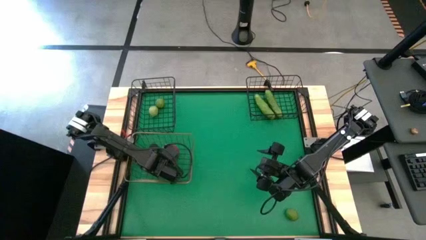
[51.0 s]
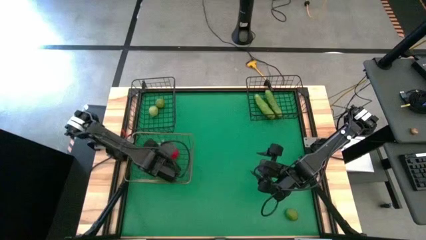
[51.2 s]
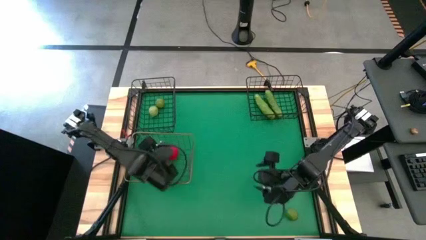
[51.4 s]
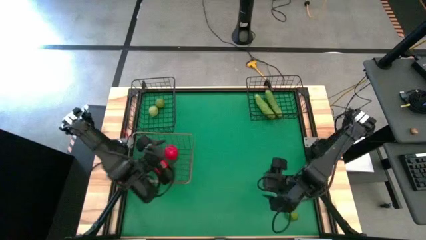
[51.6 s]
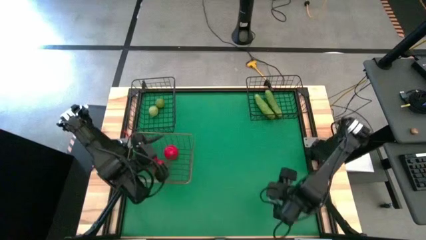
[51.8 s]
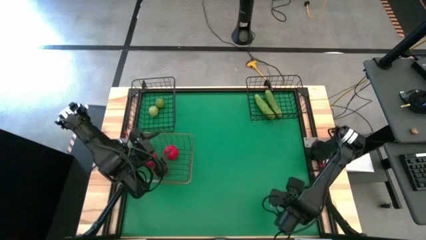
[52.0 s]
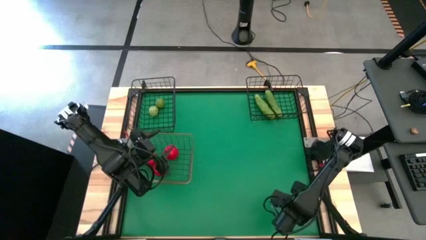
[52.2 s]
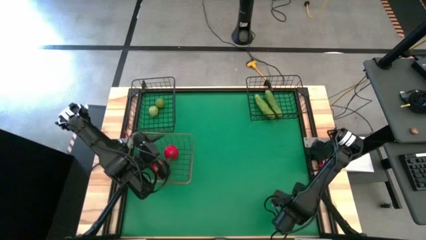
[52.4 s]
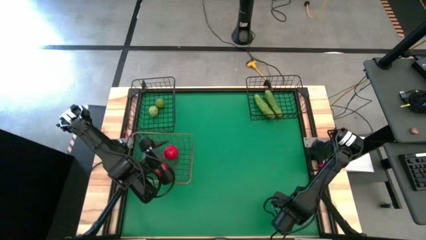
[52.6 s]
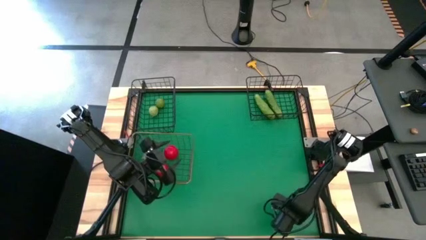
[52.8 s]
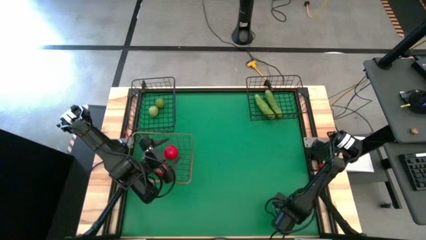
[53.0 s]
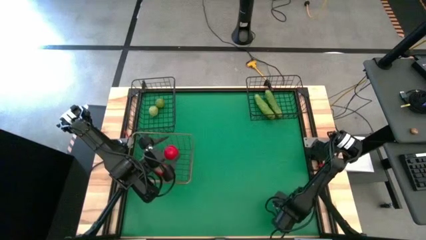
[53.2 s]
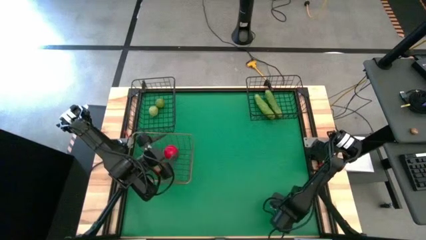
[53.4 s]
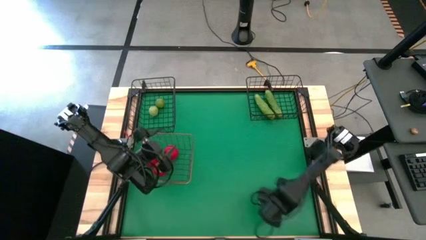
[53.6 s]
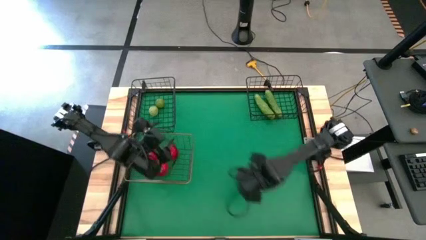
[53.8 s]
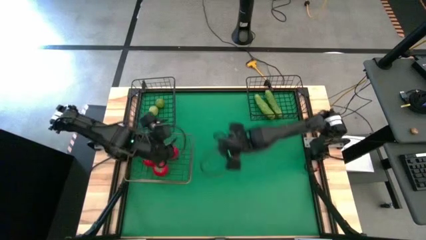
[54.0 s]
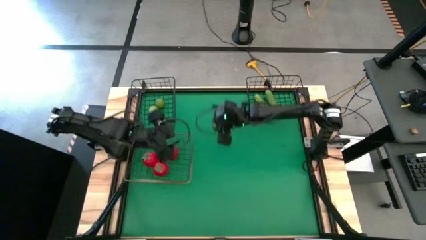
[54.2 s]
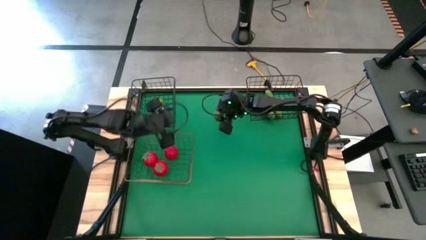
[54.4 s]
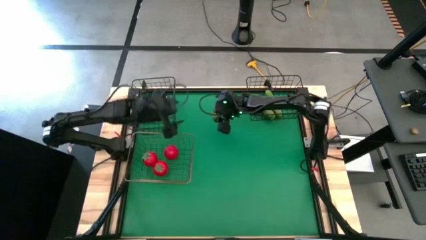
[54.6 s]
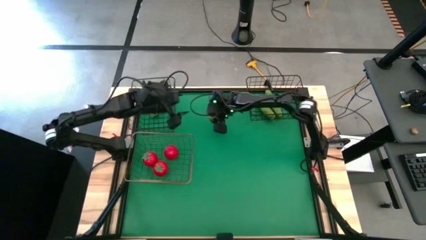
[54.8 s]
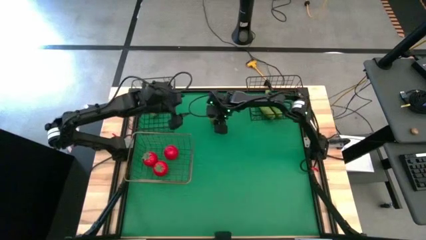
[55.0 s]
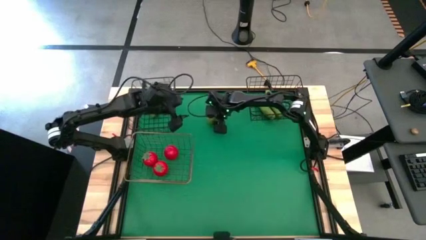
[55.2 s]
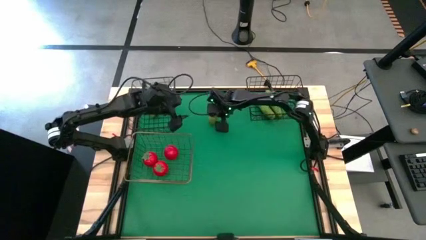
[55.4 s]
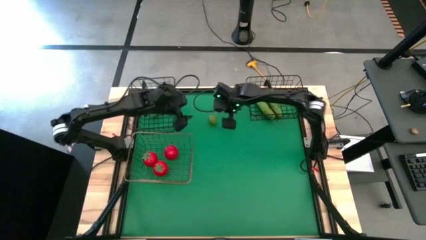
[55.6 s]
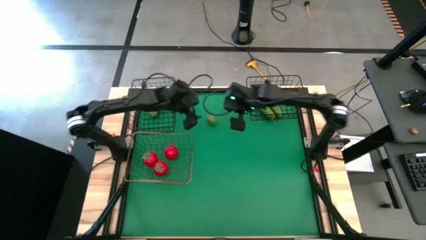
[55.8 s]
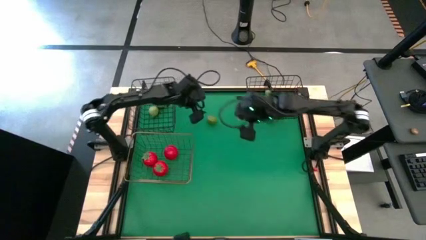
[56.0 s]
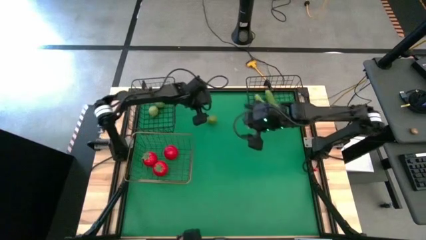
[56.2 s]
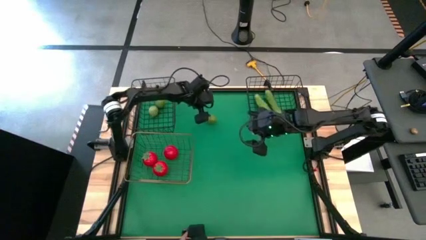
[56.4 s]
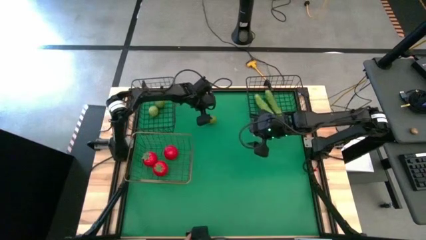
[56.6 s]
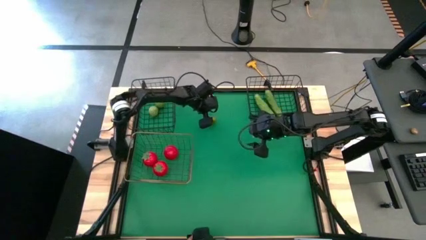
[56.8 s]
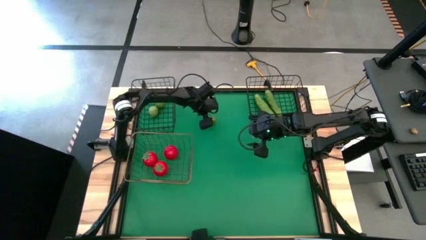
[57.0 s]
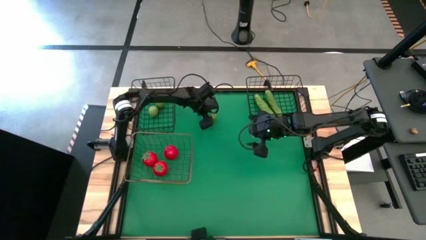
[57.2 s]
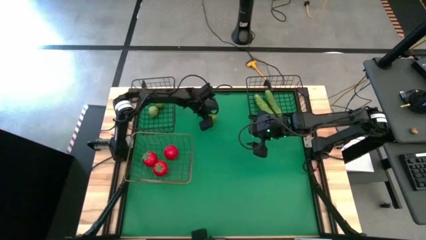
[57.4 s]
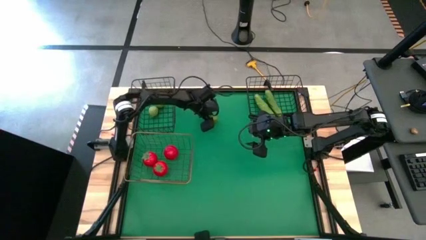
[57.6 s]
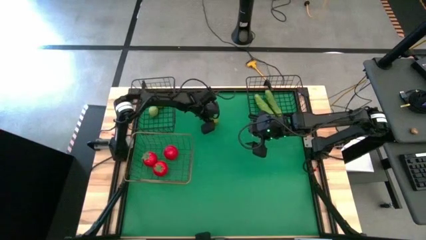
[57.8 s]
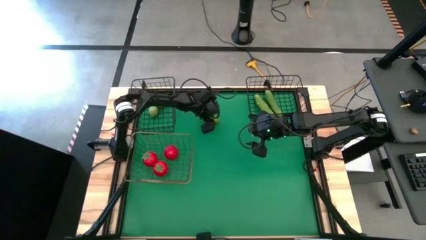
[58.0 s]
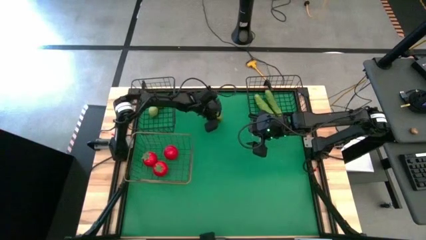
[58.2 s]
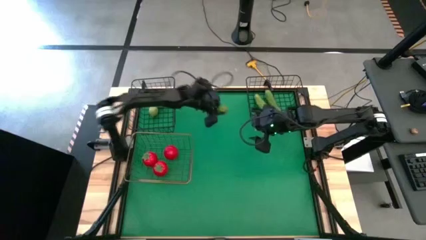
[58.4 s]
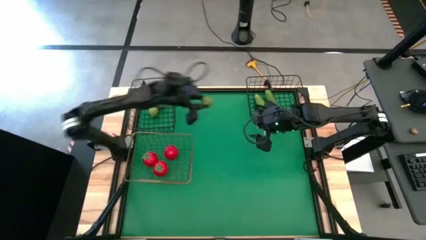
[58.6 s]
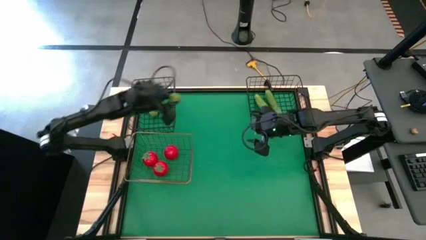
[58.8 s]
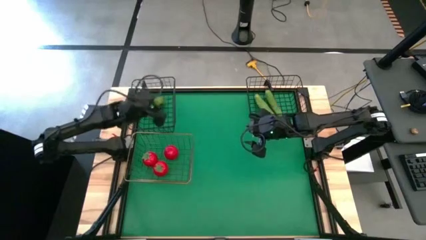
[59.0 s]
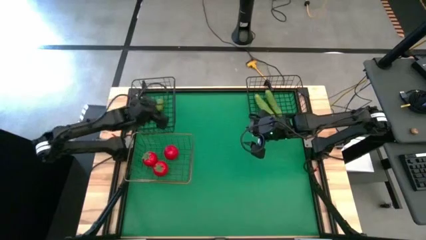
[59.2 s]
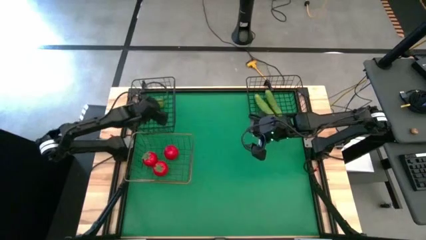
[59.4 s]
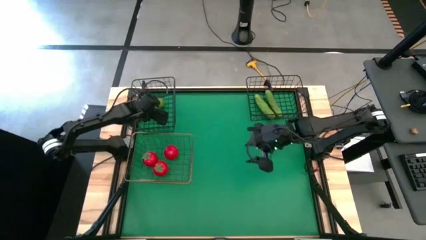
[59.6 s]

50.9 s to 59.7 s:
Task: Sort produce into baskets
Put the lime into the left black wire basket

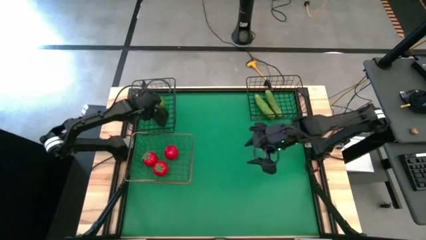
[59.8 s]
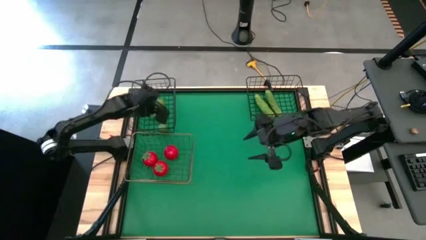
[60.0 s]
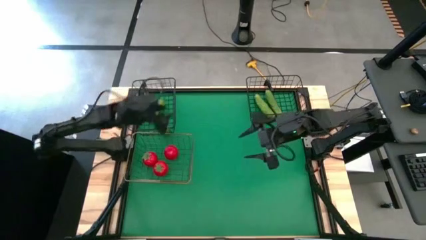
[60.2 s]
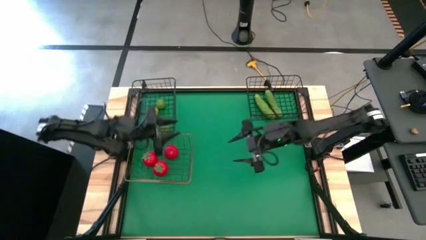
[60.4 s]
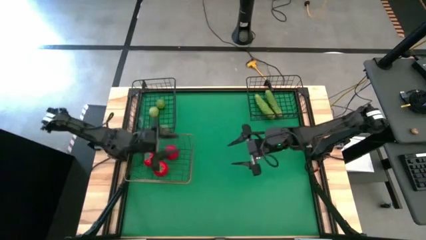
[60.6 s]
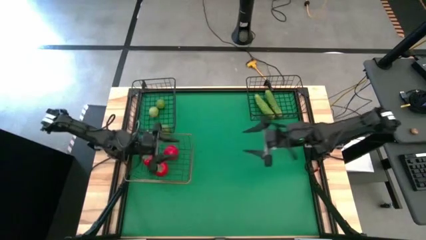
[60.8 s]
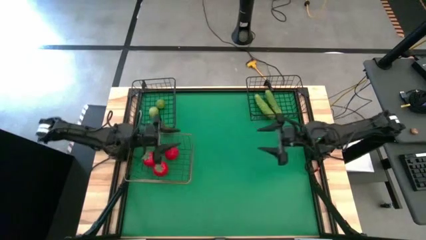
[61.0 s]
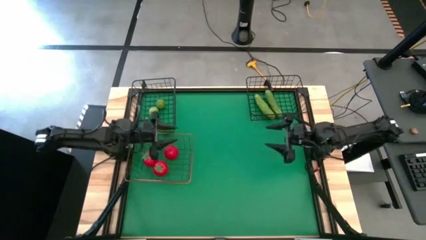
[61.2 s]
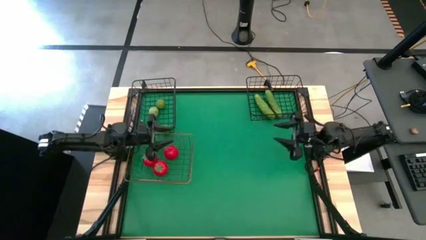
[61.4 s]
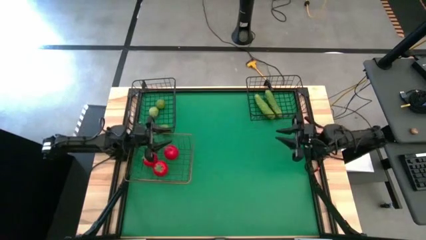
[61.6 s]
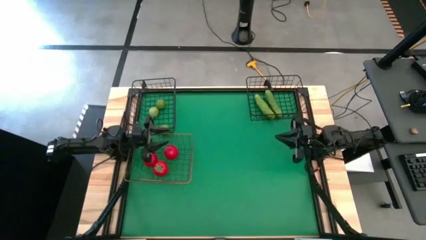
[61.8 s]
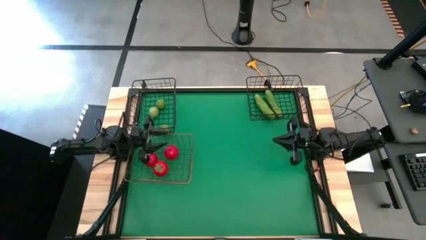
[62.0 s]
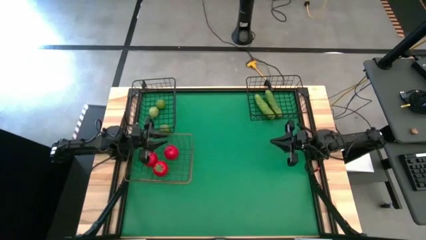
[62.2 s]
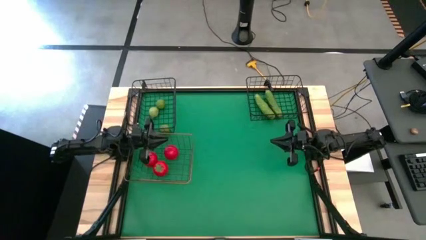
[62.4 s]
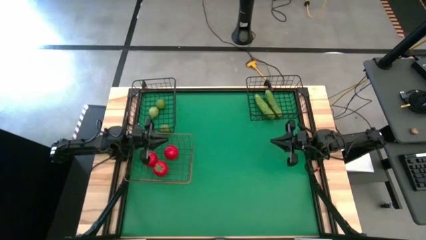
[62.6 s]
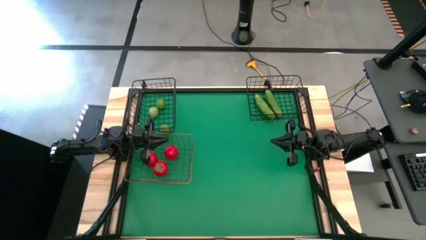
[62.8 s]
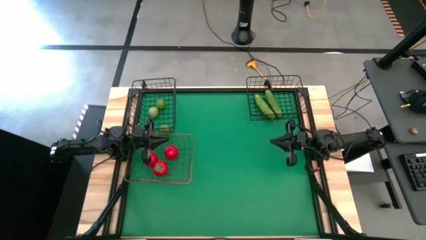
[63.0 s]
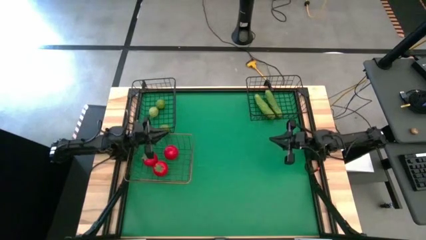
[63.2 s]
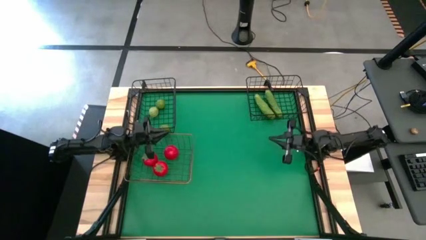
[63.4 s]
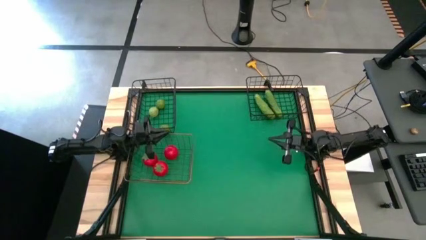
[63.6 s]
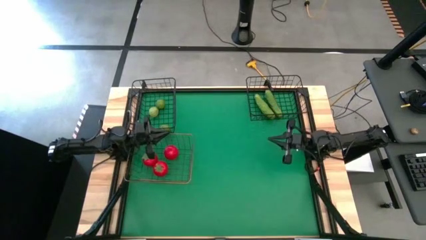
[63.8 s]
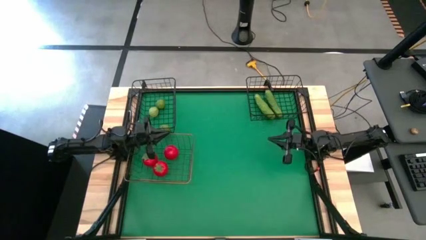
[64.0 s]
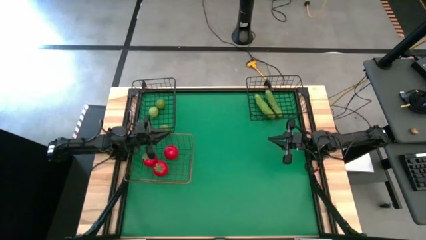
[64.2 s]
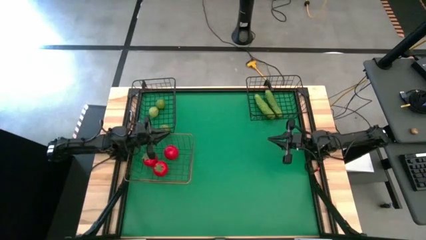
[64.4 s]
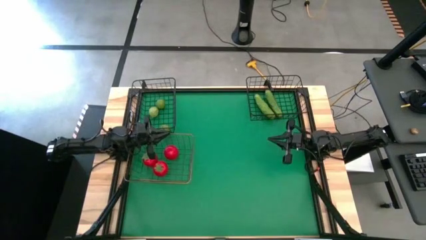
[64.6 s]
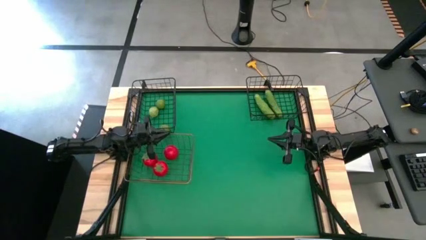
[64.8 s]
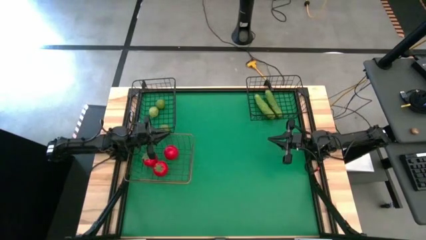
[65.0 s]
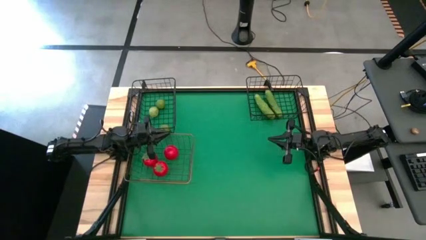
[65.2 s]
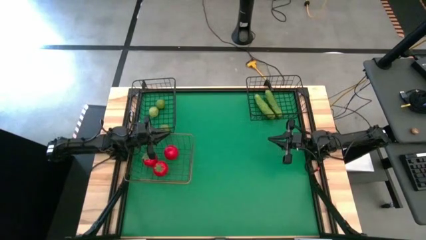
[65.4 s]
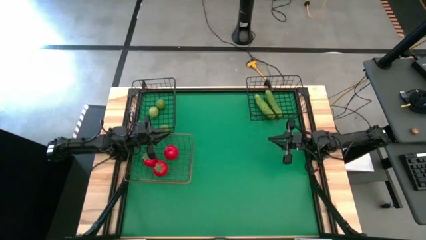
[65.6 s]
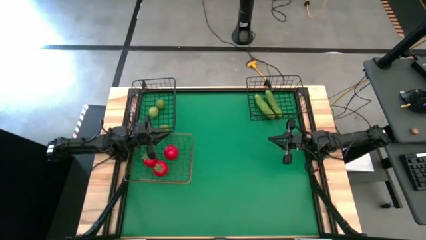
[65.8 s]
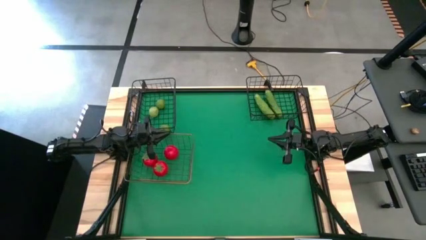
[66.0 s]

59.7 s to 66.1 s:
Return to Home Position

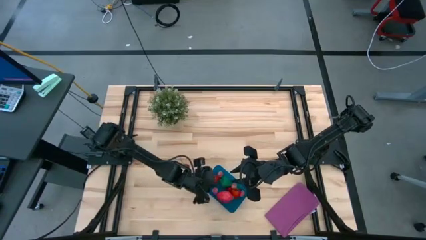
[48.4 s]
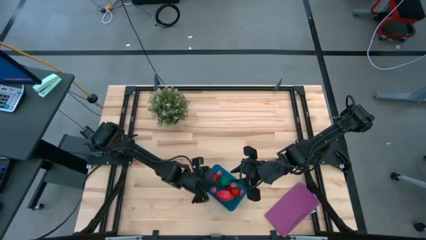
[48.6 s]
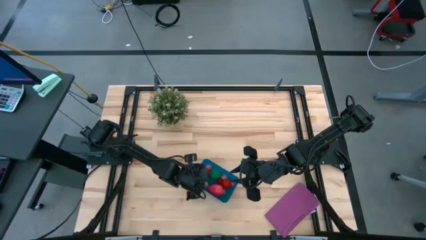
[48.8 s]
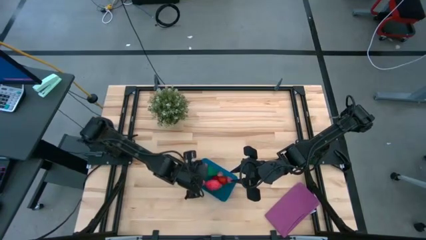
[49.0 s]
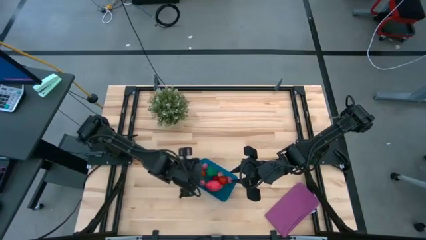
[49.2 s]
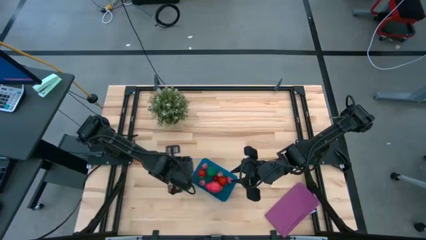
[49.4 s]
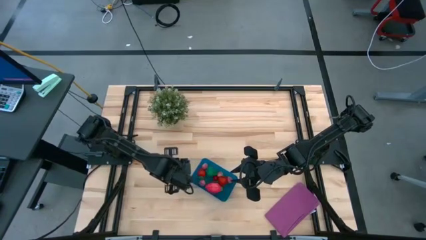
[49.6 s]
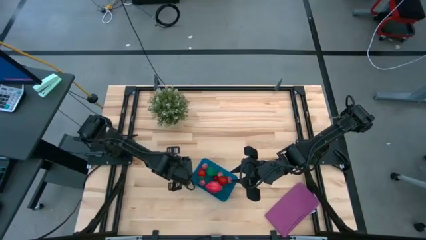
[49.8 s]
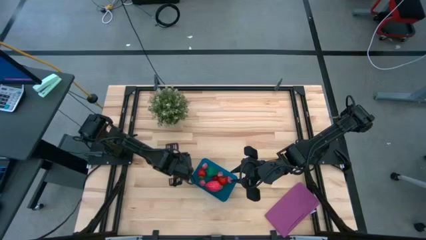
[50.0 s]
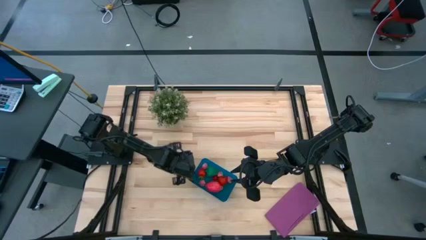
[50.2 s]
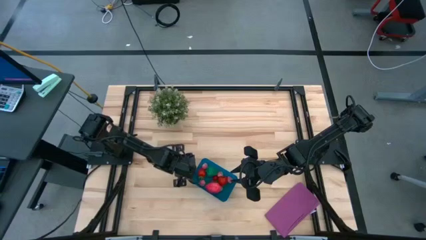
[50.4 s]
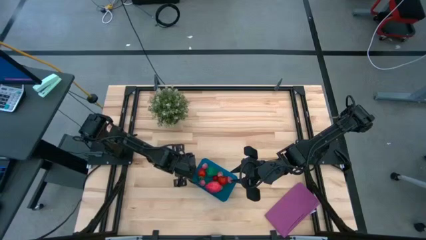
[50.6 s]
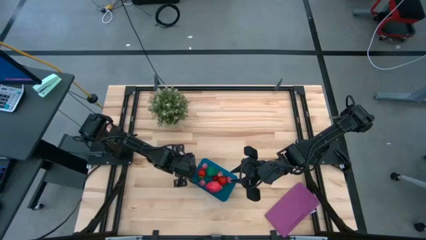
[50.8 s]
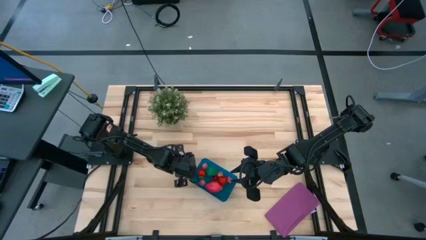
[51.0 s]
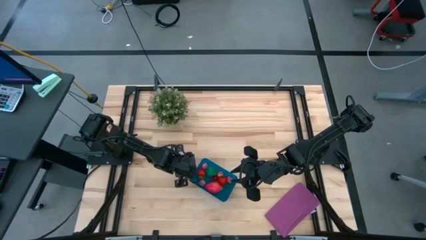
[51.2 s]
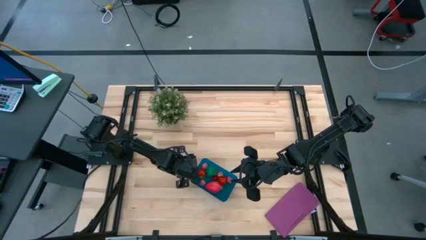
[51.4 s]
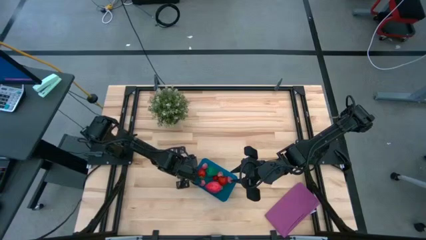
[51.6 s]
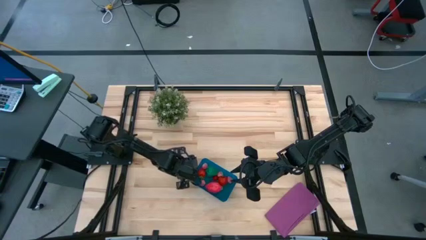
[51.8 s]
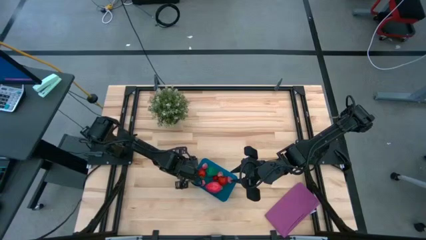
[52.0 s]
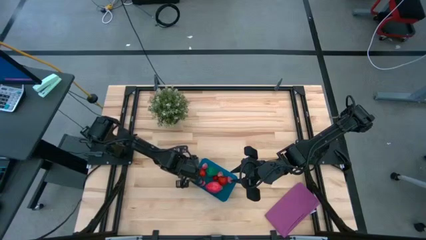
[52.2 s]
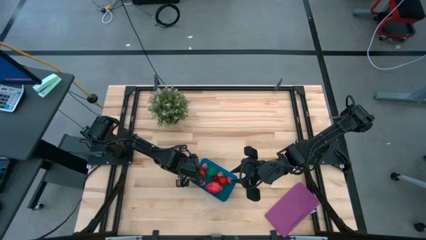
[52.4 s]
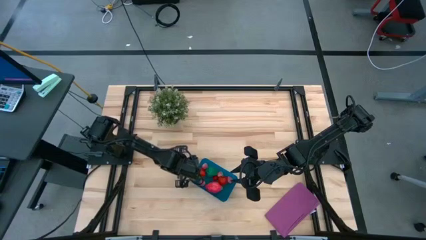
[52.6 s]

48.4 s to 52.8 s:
Task: Pick and placing Produce into tupperware
Put the red cherry into the blue bin
